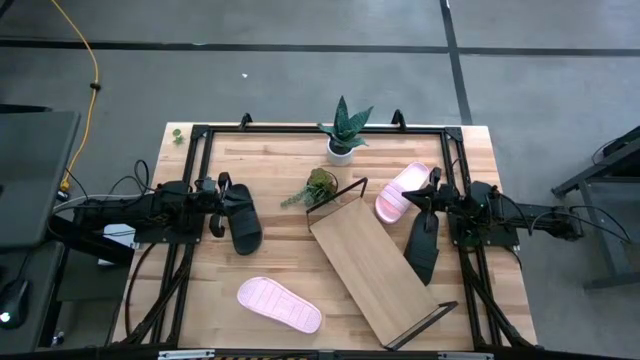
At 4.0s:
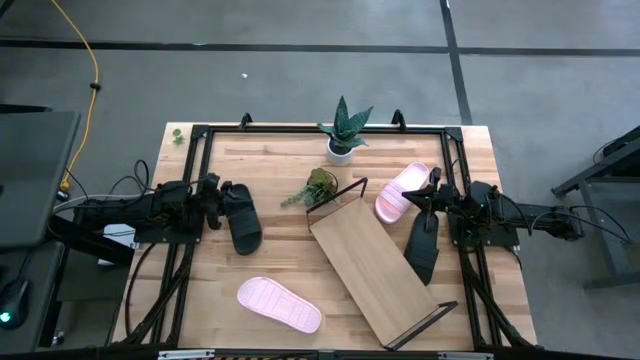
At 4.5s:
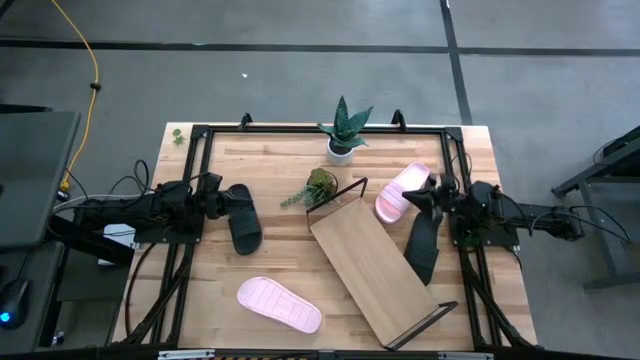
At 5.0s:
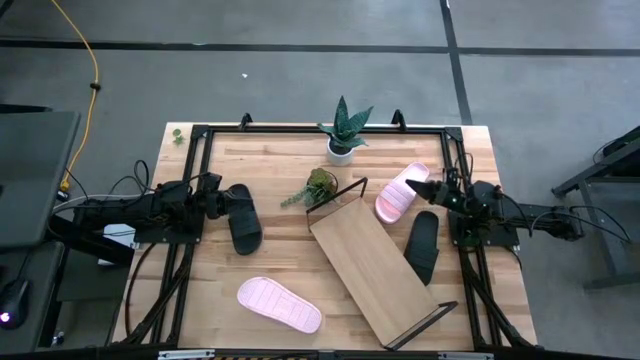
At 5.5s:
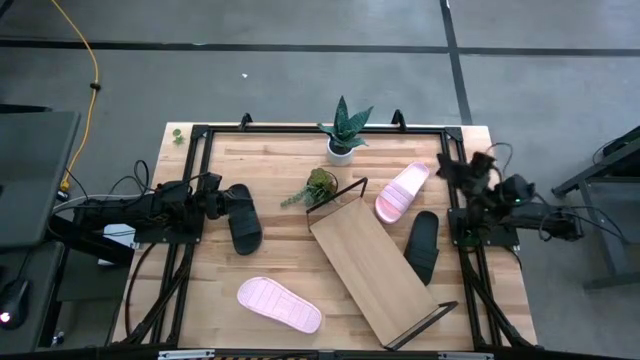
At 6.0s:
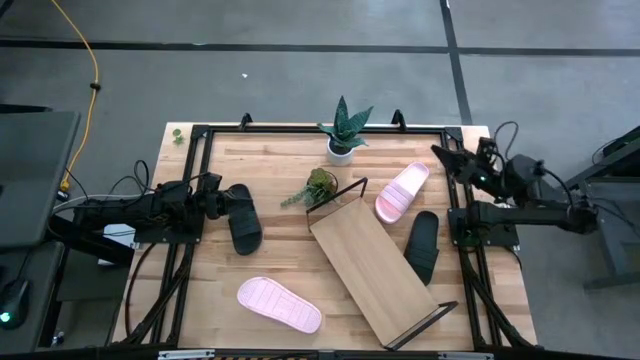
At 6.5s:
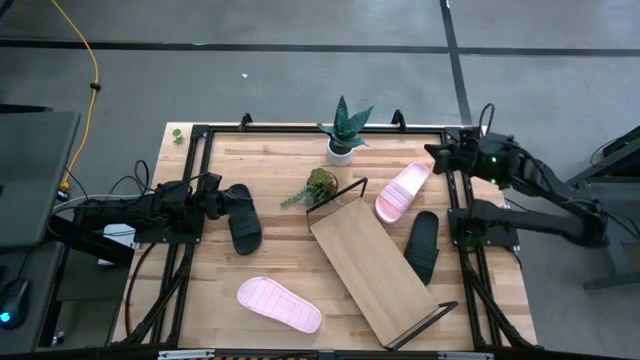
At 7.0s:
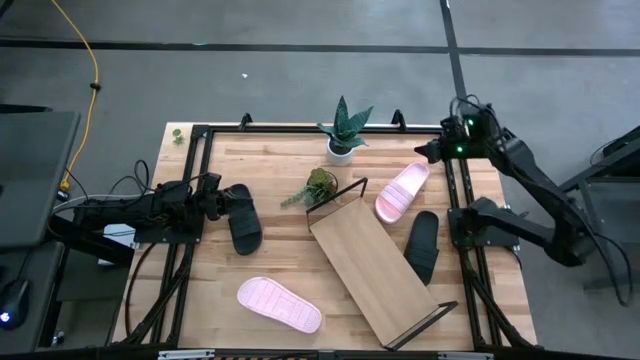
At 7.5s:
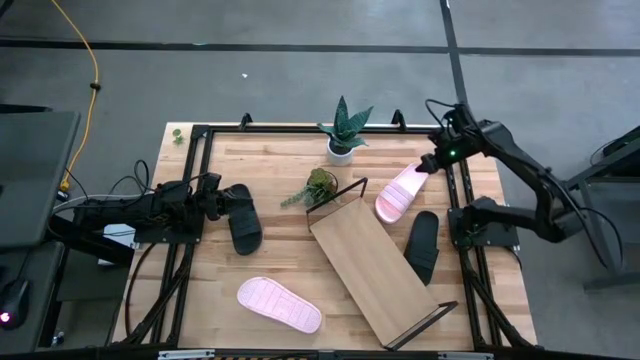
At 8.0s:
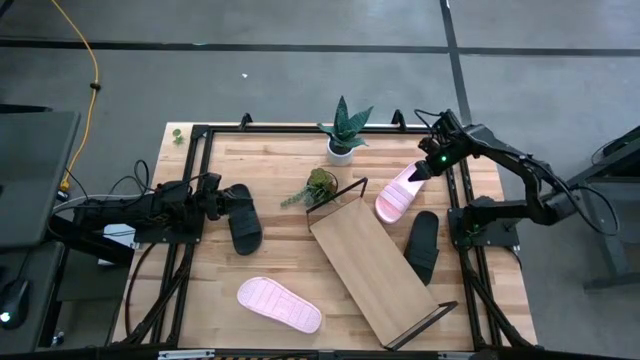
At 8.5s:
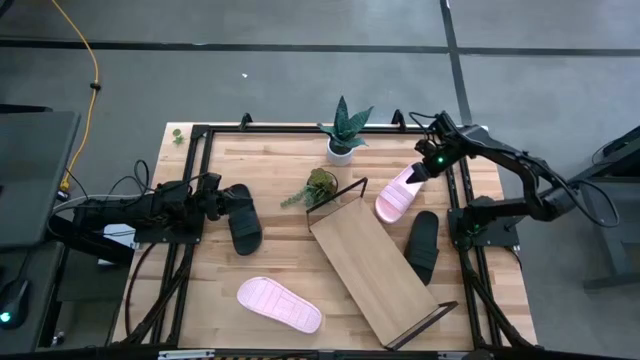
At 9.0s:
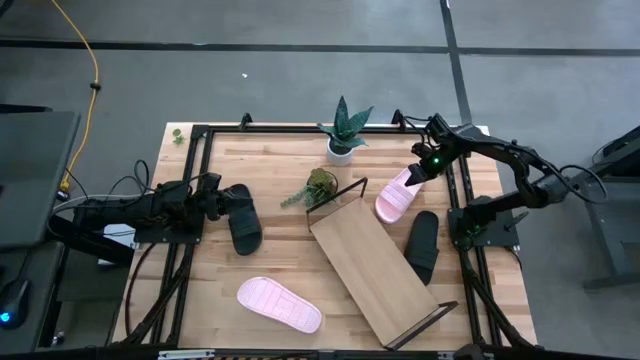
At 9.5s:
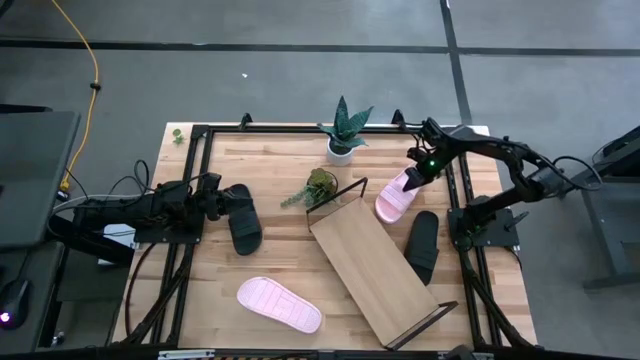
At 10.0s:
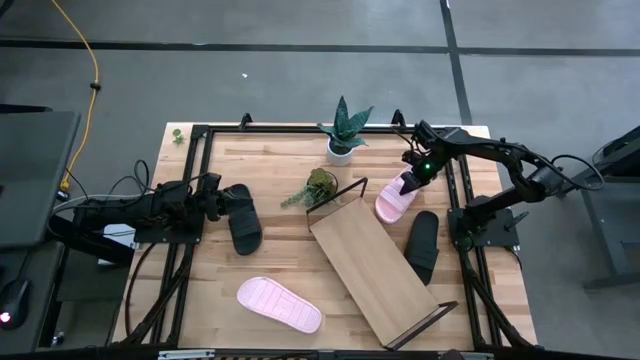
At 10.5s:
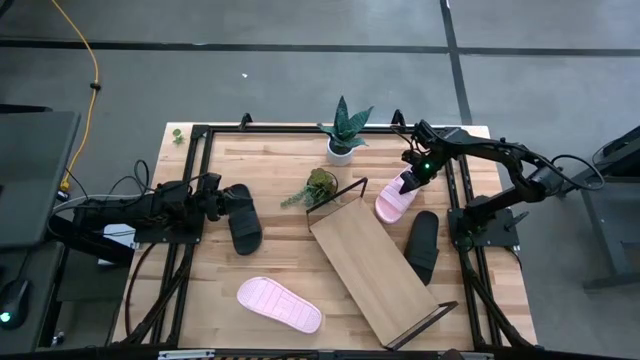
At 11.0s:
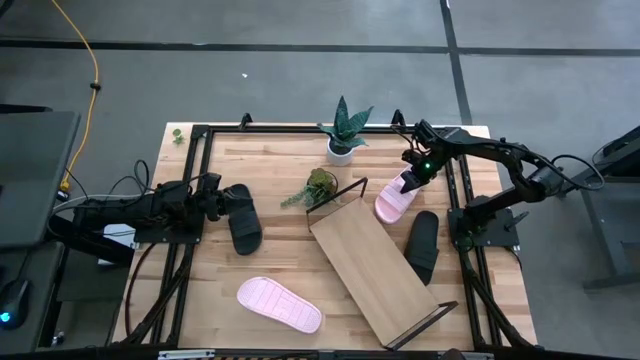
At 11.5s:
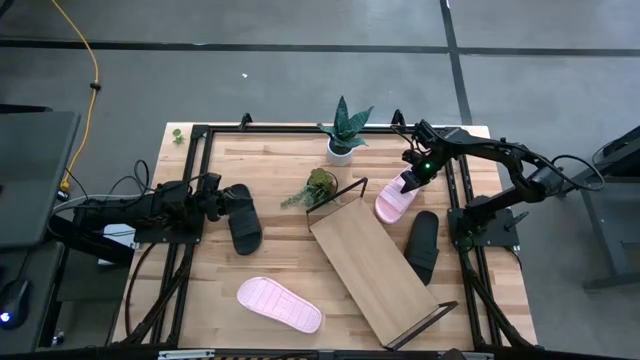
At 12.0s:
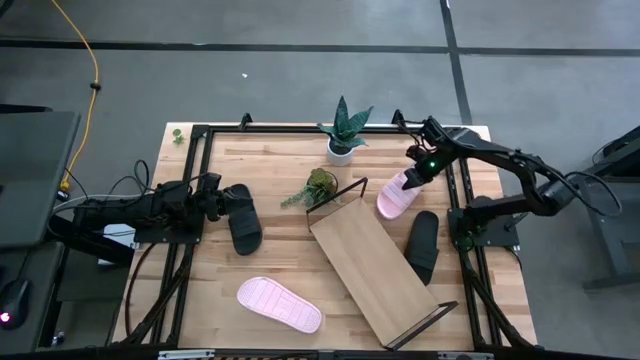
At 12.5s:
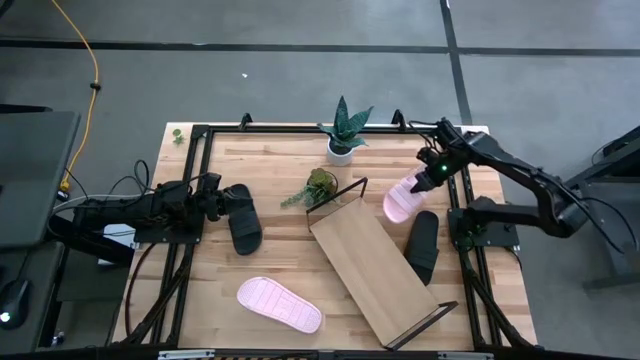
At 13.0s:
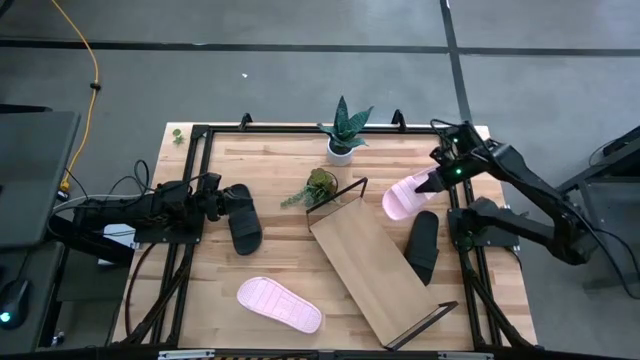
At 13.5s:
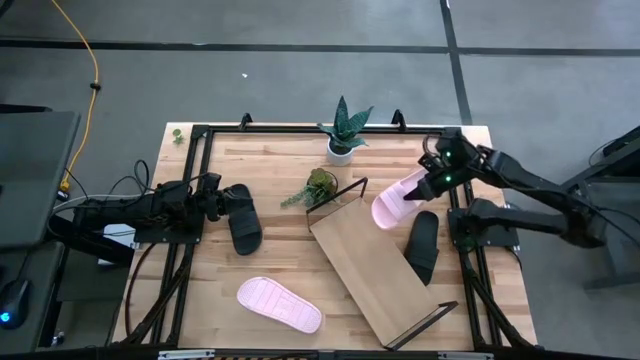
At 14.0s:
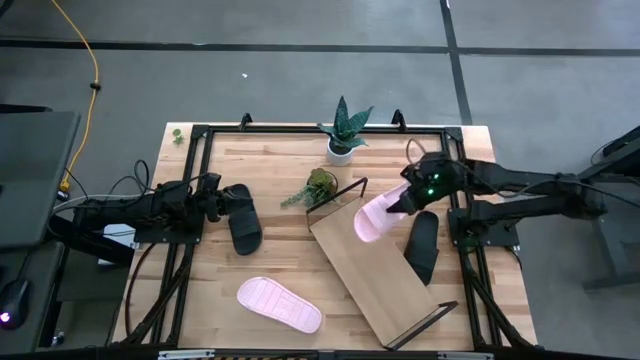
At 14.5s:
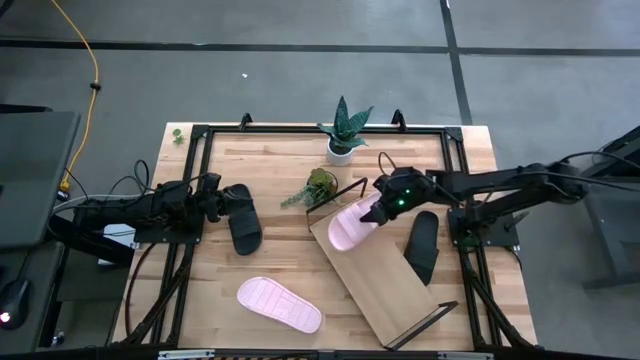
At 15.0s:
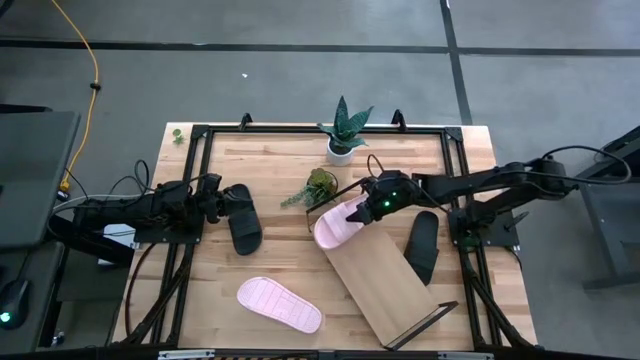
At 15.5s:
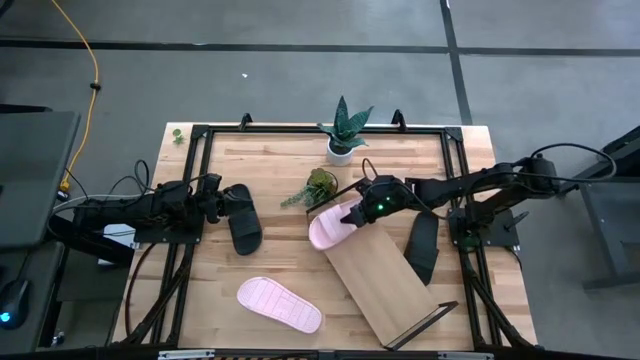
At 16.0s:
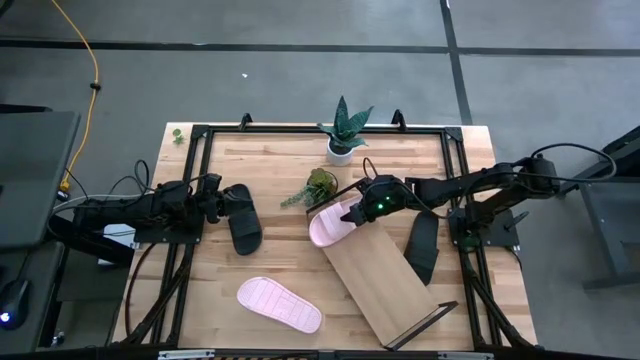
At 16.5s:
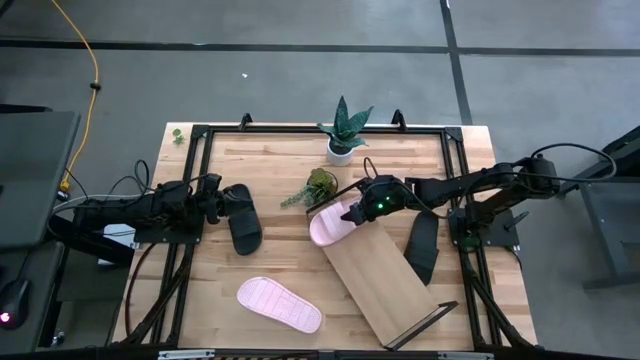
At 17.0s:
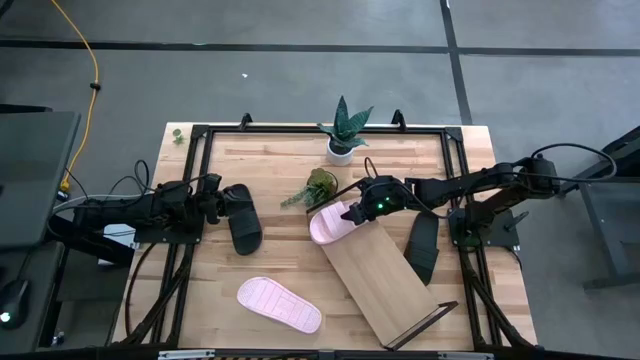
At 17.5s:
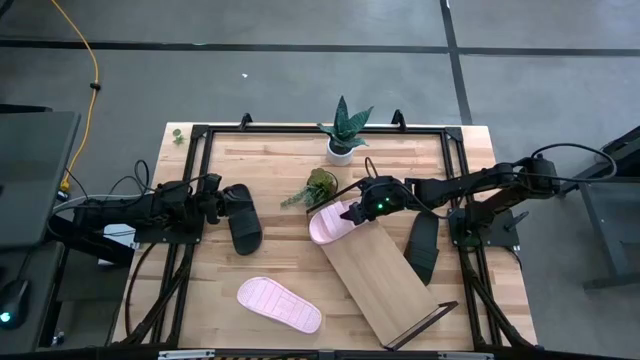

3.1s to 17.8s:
Task: Pick and place slides into the shelf
Put the top right pink slipper on the shelf

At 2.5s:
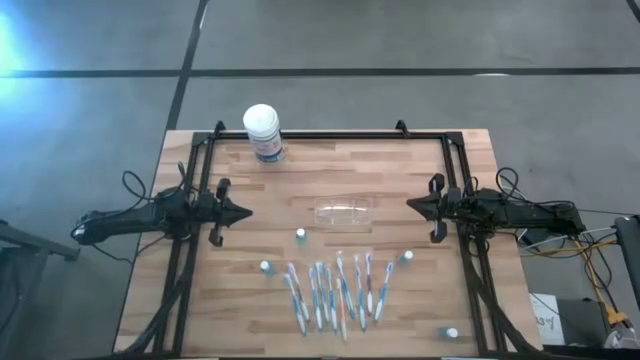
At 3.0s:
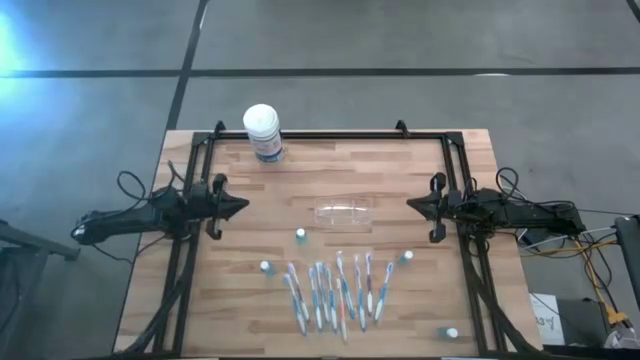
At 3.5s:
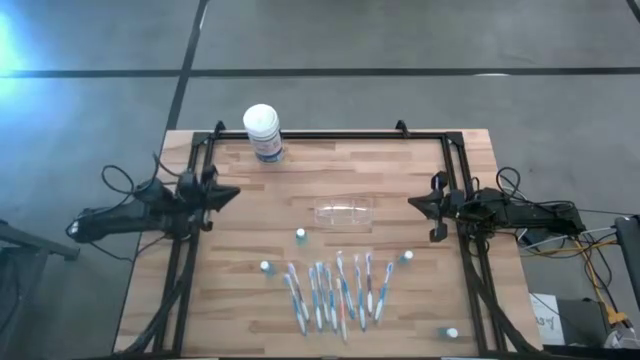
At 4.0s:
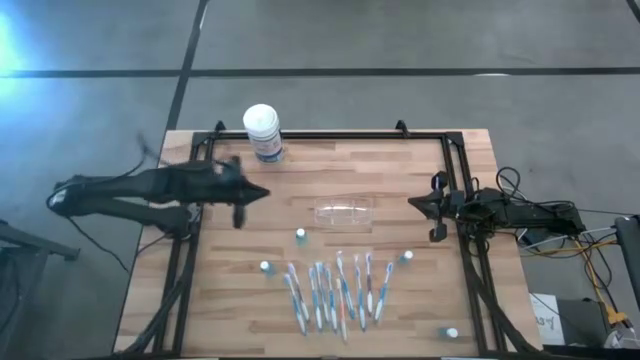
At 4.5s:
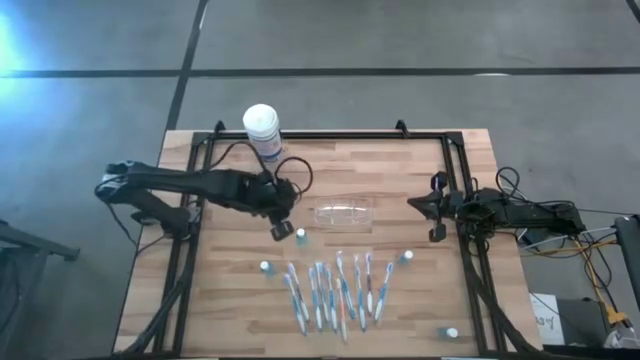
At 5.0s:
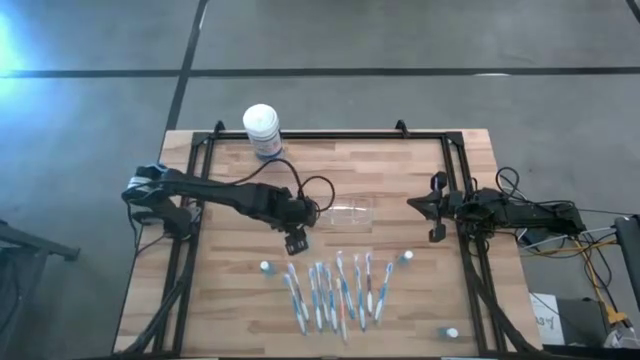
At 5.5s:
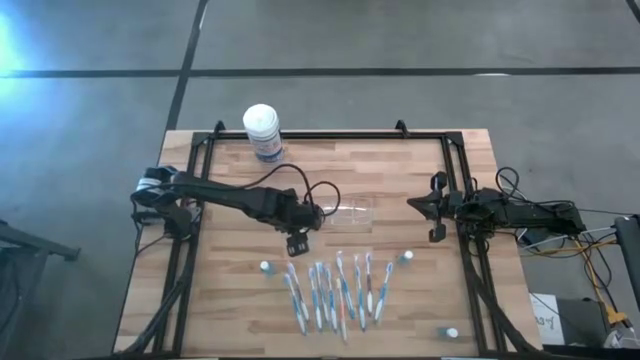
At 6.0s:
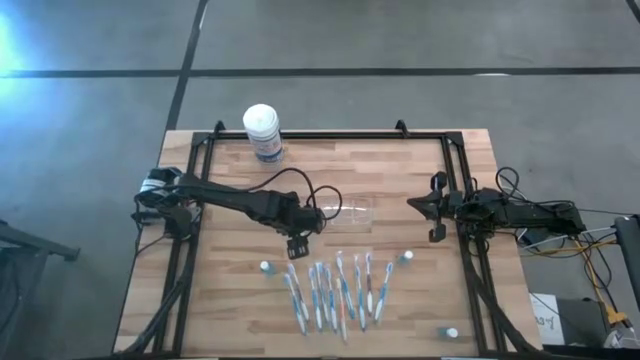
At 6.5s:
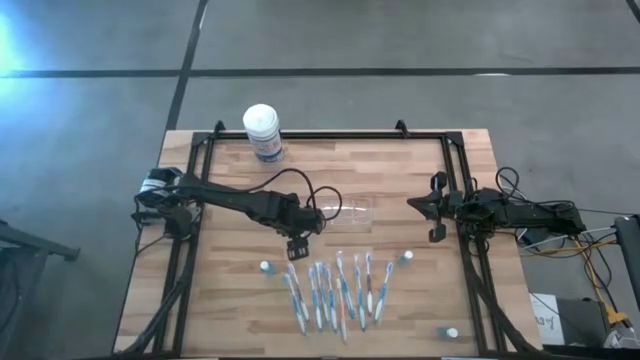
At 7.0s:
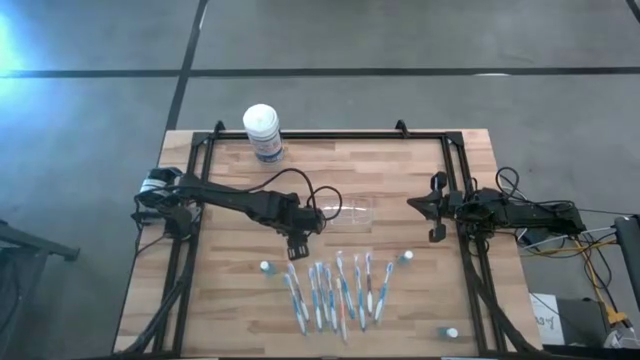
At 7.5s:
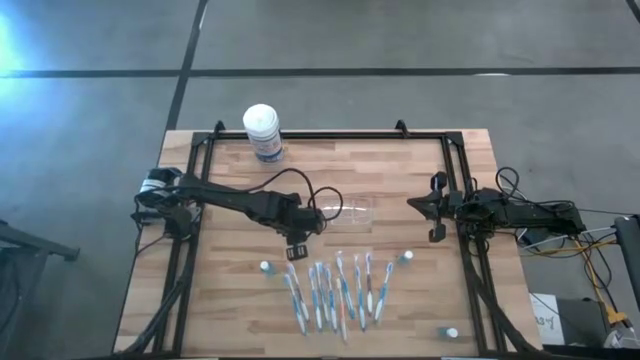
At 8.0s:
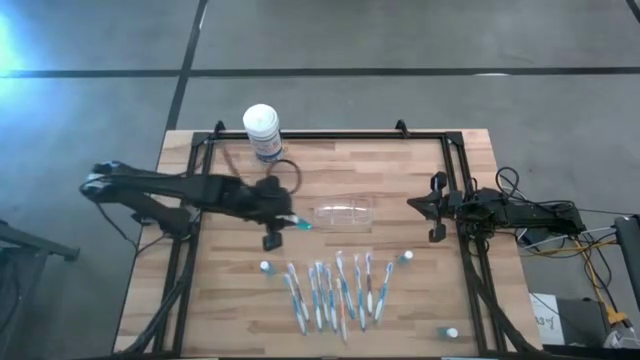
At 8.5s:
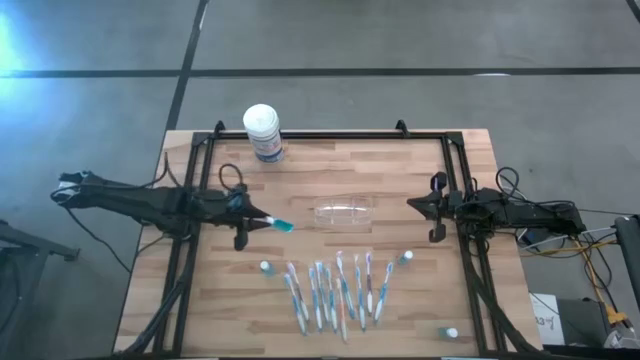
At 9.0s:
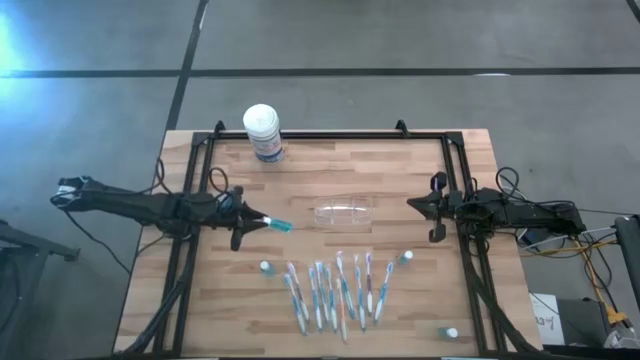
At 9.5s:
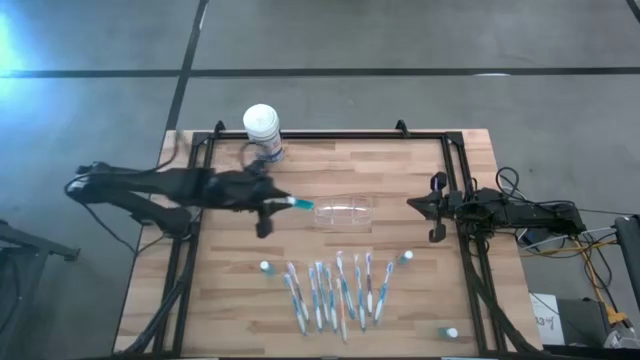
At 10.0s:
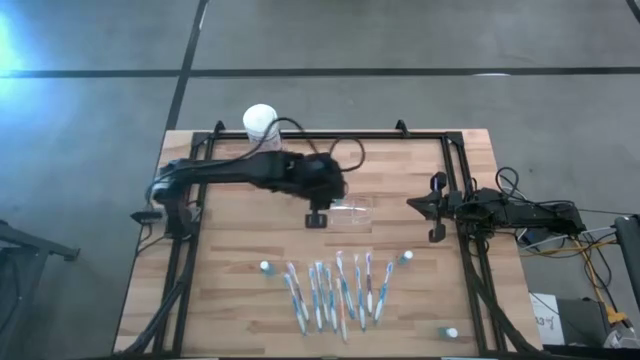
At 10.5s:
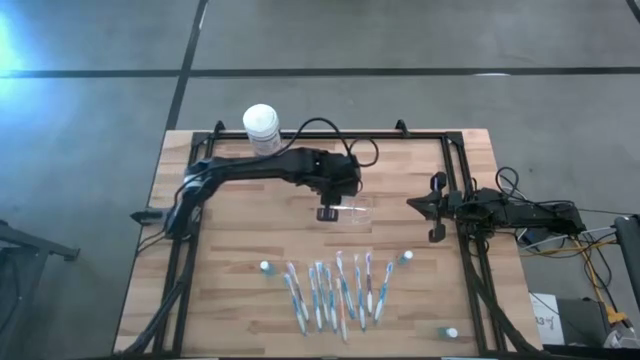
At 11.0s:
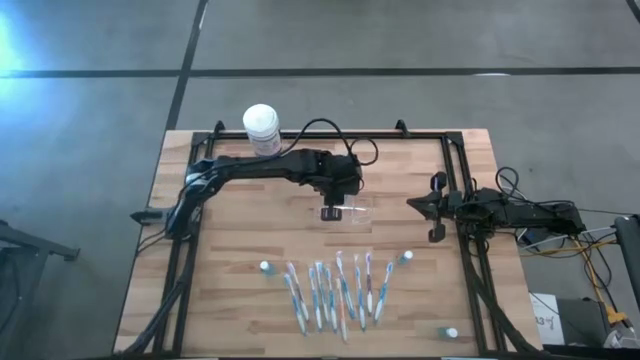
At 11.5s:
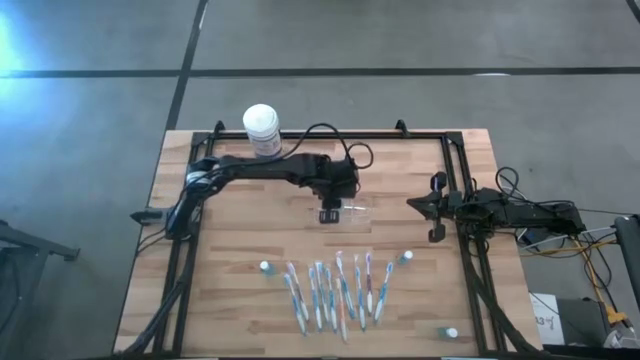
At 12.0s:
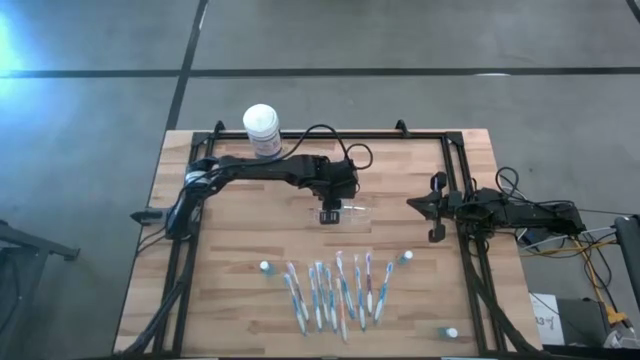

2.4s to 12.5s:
Task: Pick & Place toothbrushing station
Put the blue mouthwash into the transparent organizer
